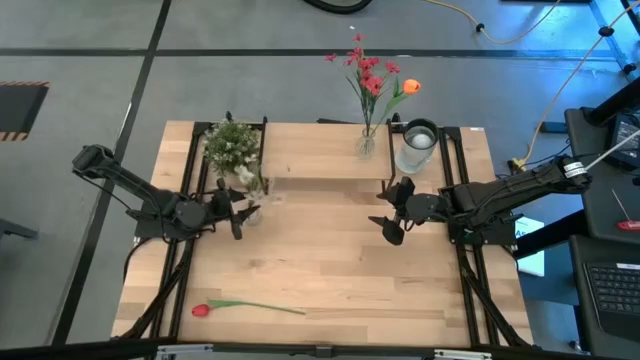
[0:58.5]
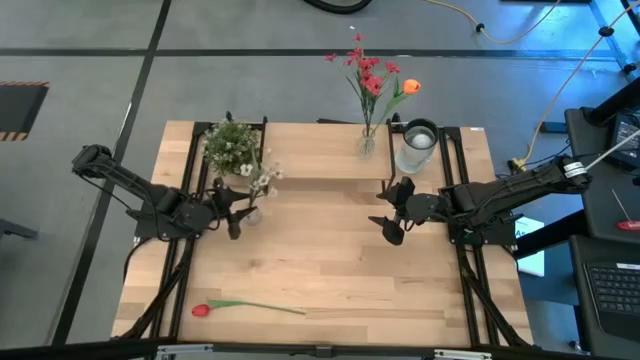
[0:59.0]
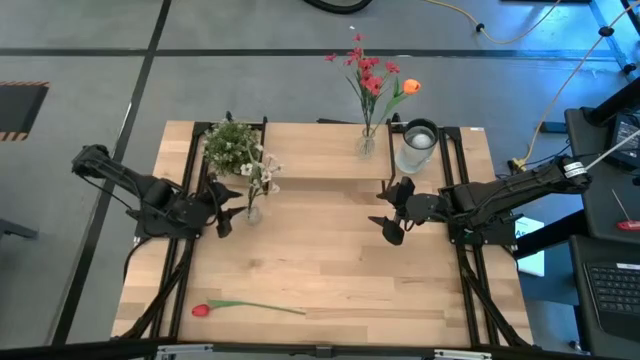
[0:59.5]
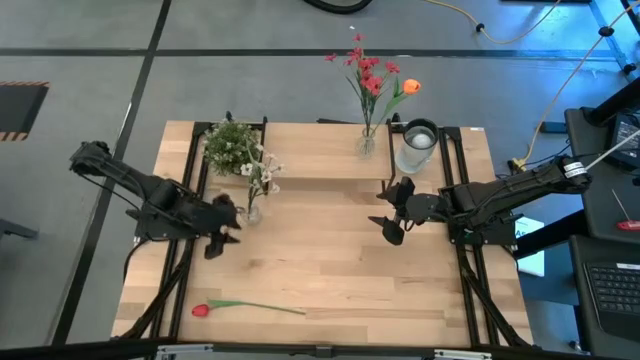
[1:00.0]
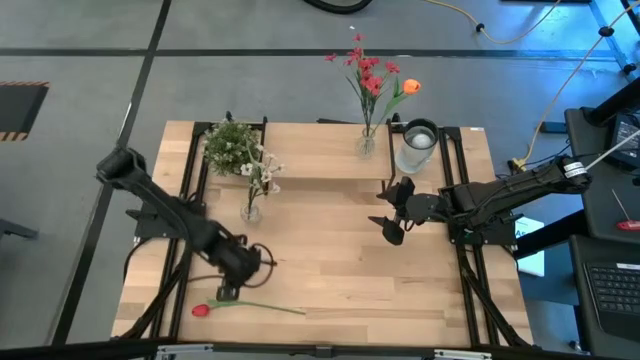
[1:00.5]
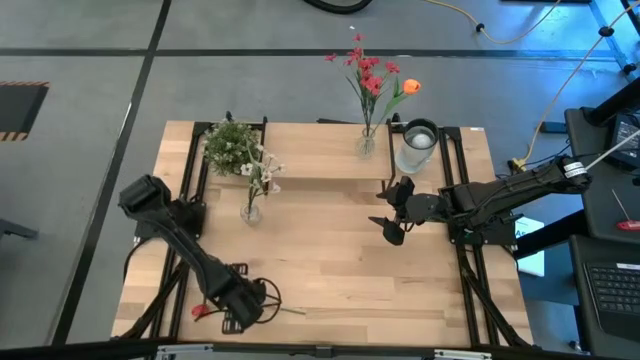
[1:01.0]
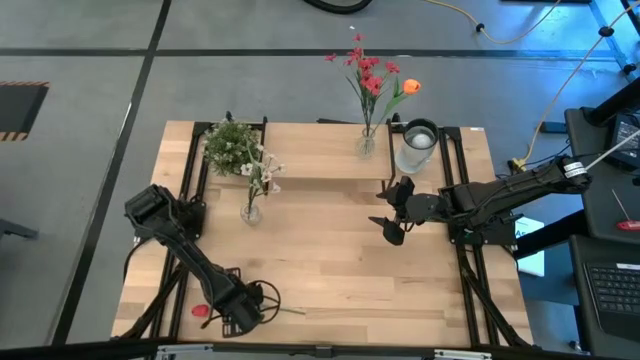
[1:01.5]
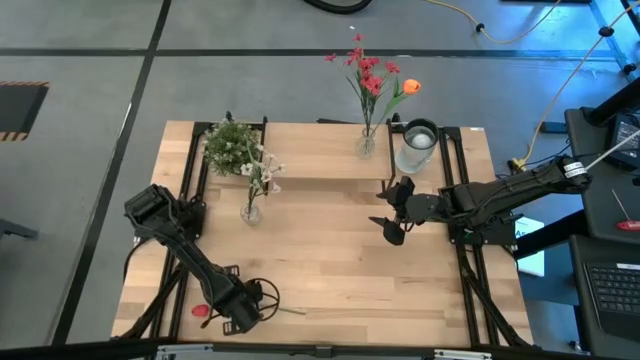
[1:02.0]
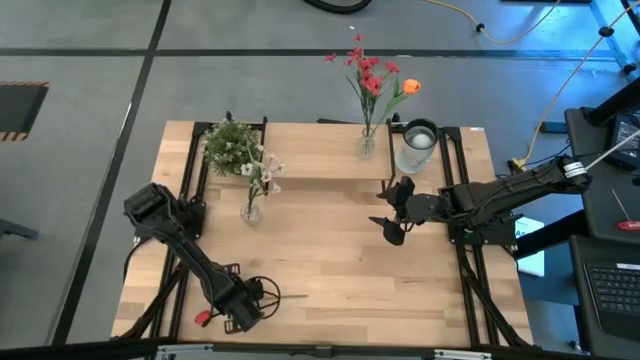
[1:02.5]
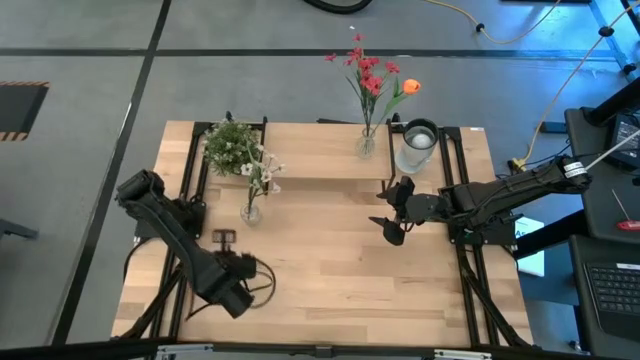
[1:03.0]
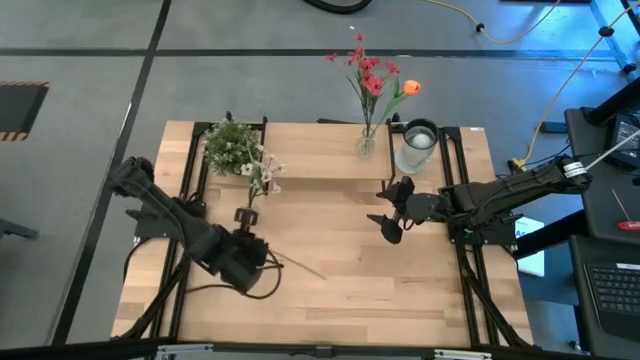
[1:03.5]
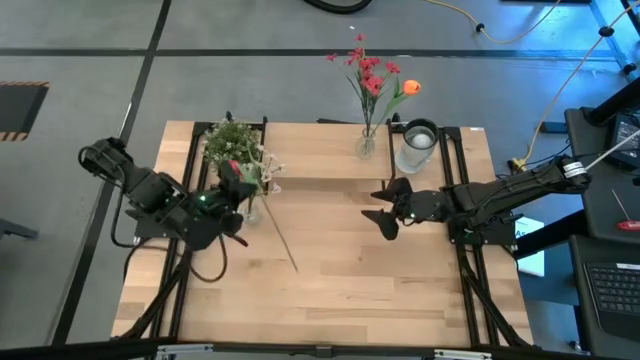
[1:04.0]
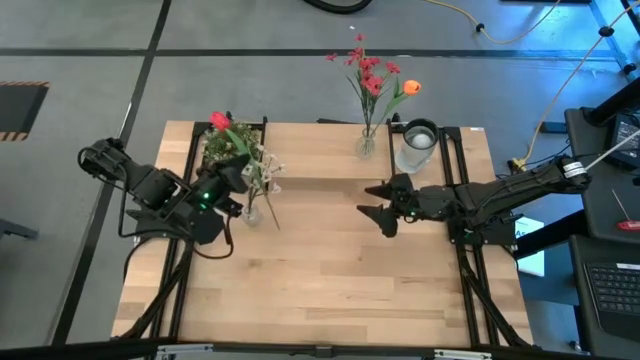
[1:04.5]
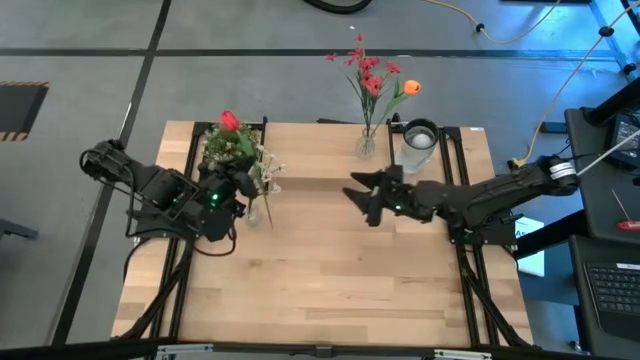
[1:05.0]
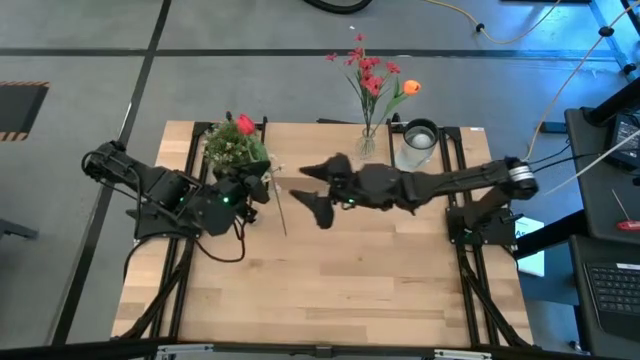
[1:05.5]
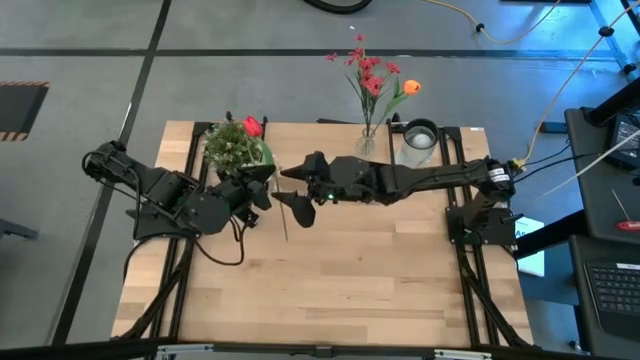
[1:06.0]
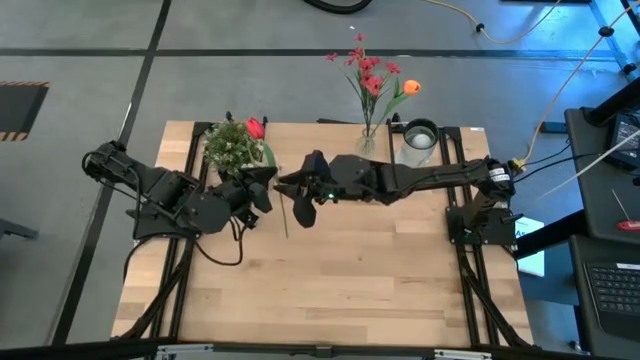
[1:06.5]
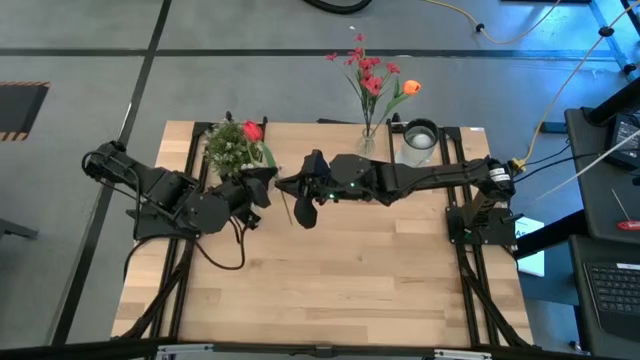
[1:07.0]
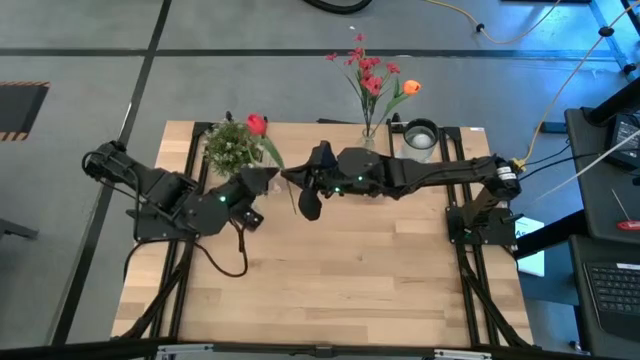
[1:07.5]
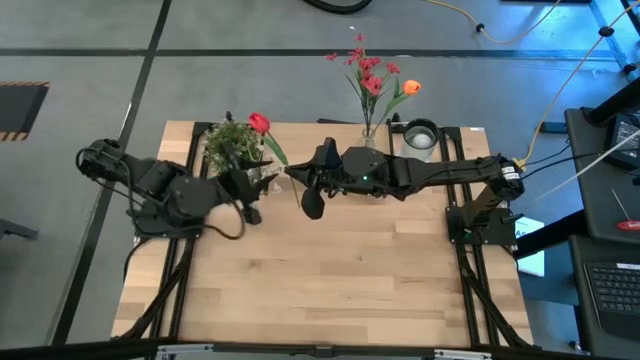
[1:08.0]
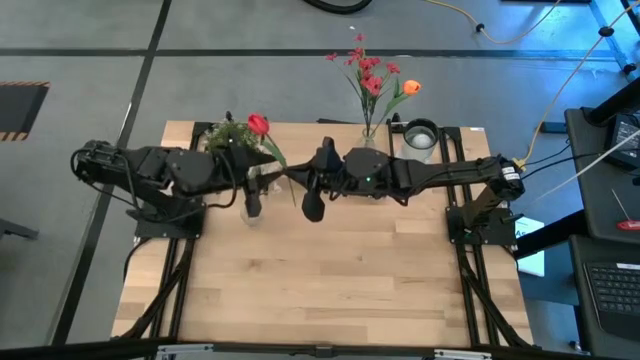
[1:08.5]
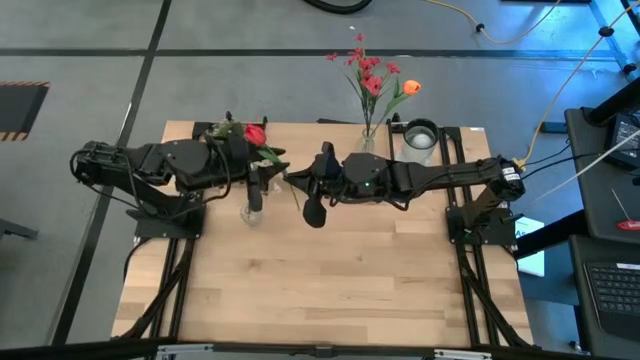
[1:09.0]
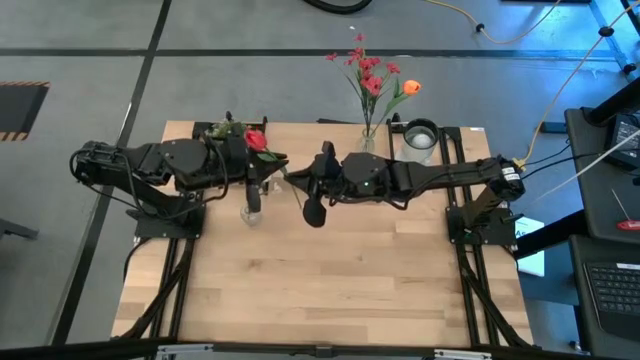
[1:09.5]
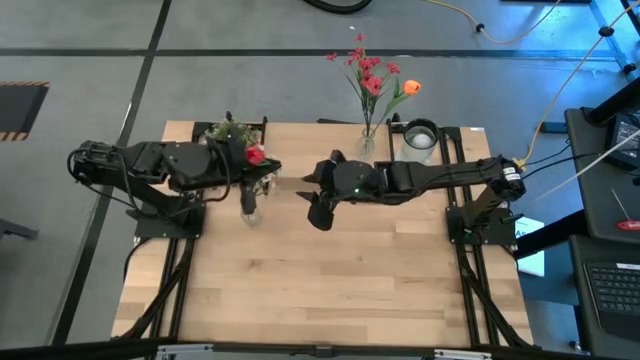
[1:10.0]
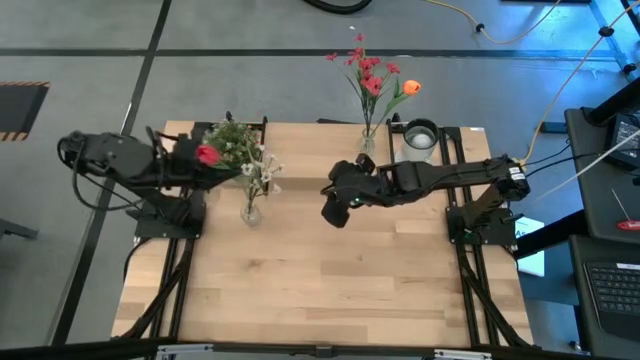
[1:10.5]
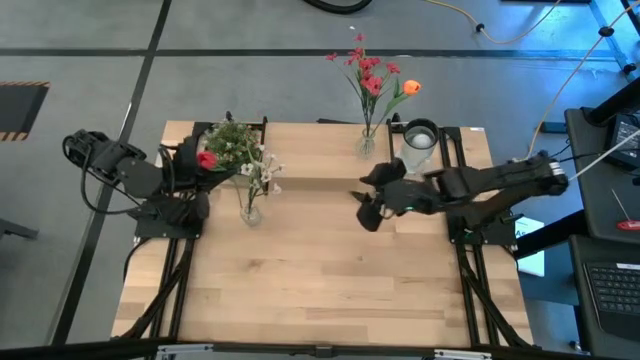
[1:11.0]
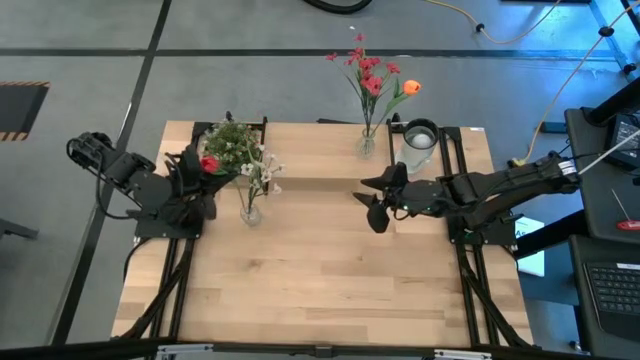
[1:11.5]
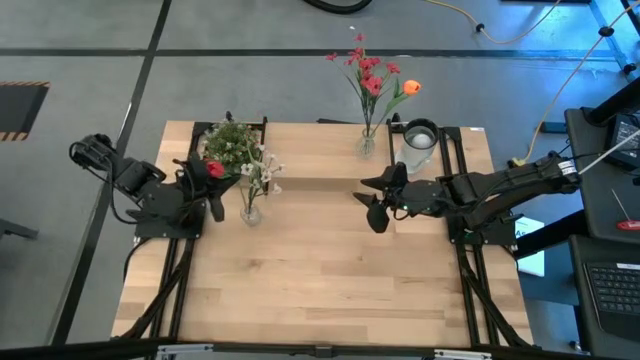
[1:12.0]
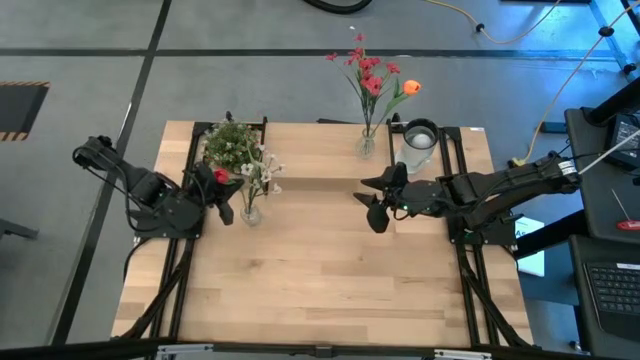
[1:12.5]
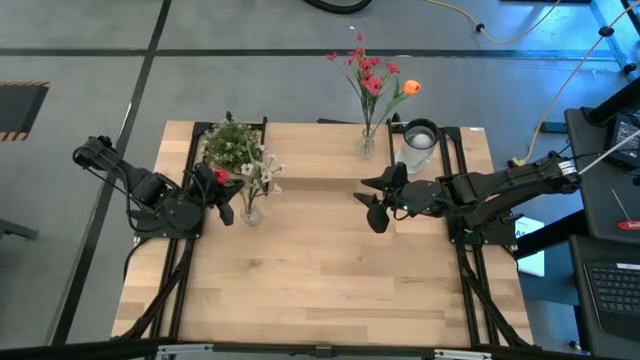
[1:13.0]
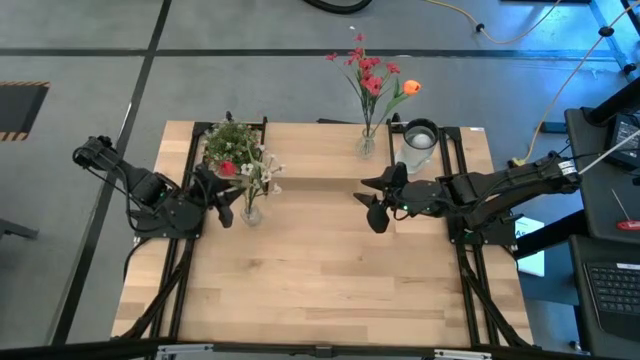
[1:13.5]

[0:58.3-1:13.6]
Task: Pick and place flowers into a vace then onto a shelf
Put the red flower into the transparent vase

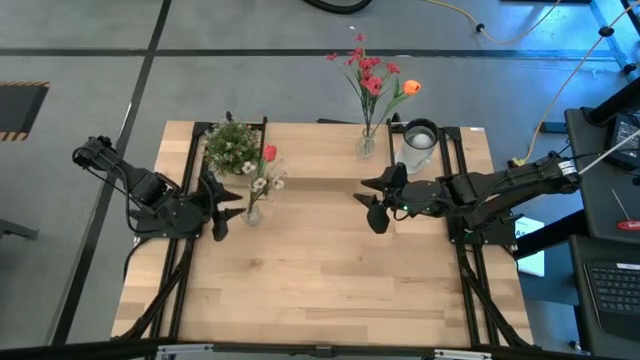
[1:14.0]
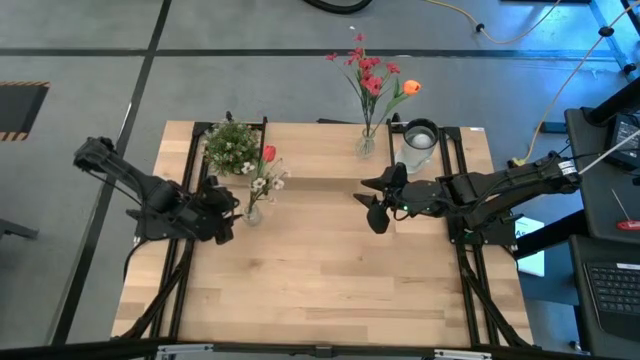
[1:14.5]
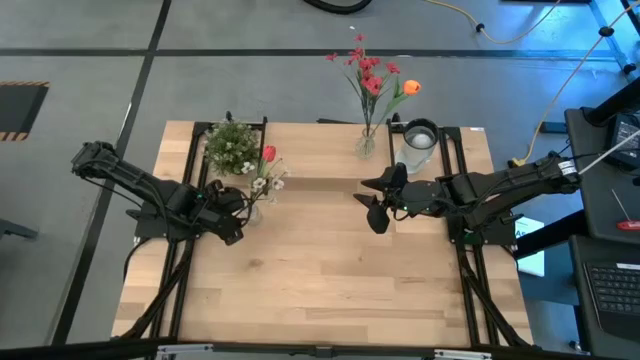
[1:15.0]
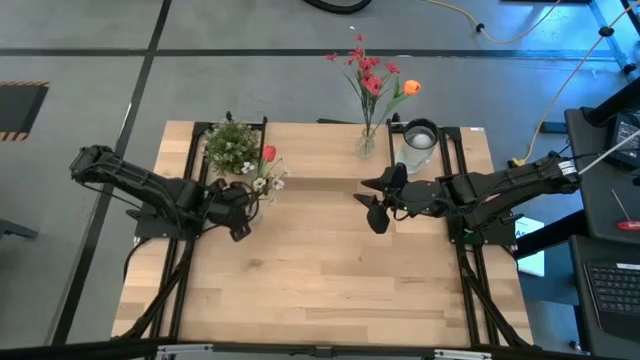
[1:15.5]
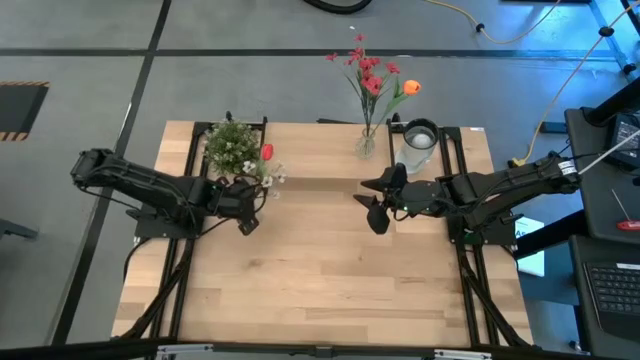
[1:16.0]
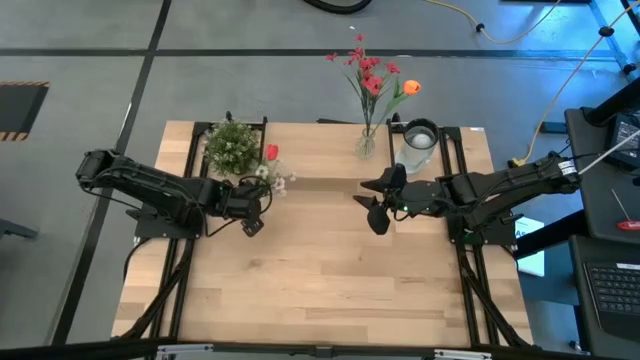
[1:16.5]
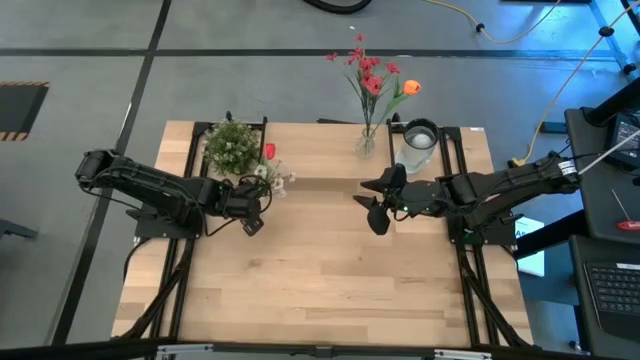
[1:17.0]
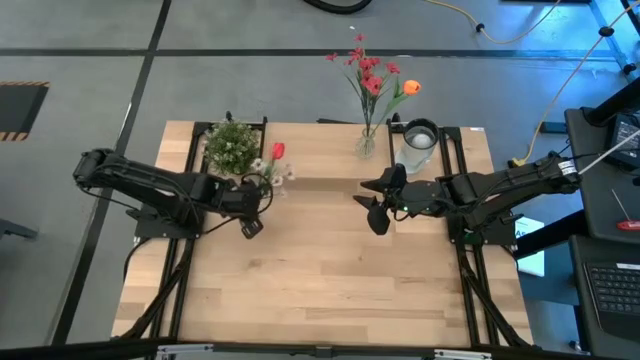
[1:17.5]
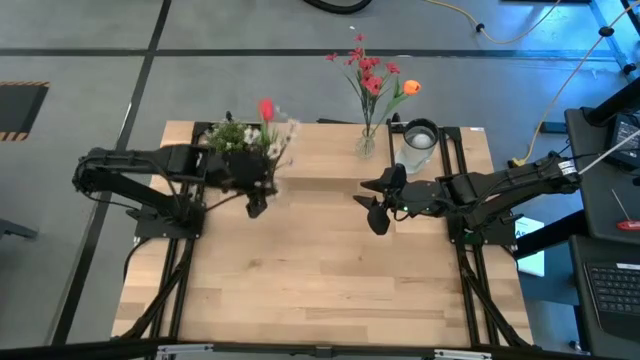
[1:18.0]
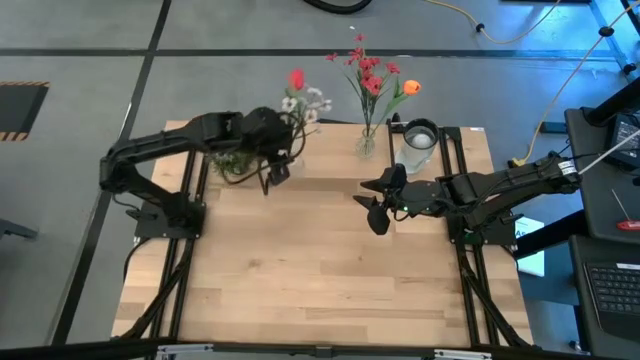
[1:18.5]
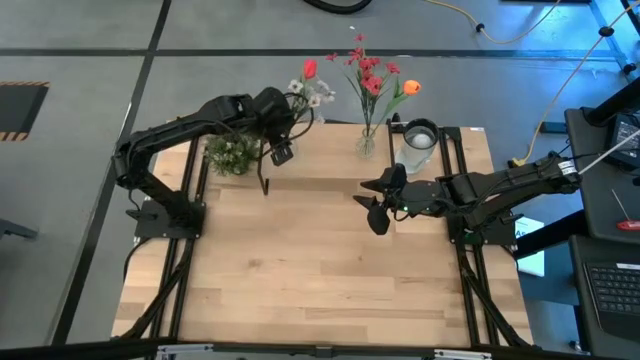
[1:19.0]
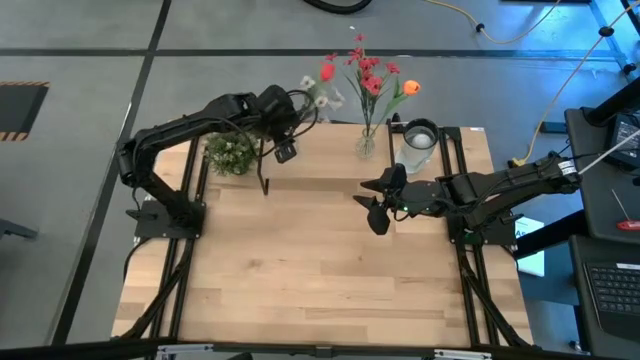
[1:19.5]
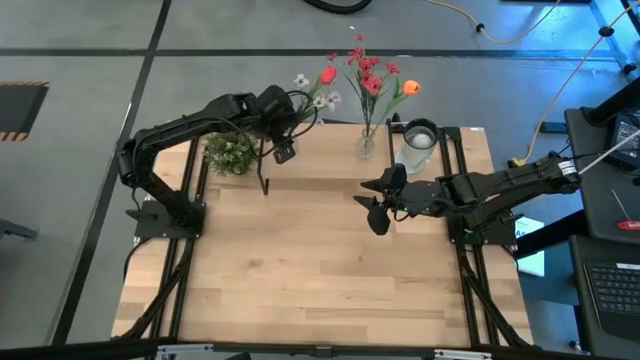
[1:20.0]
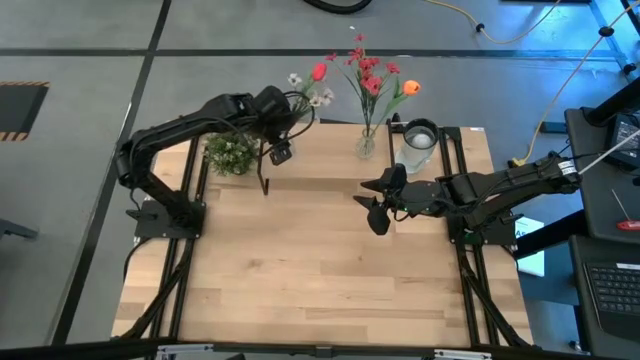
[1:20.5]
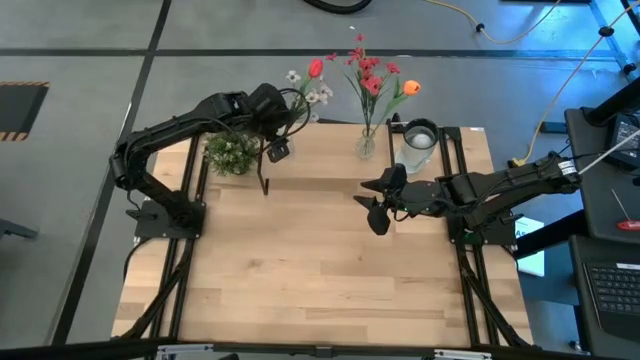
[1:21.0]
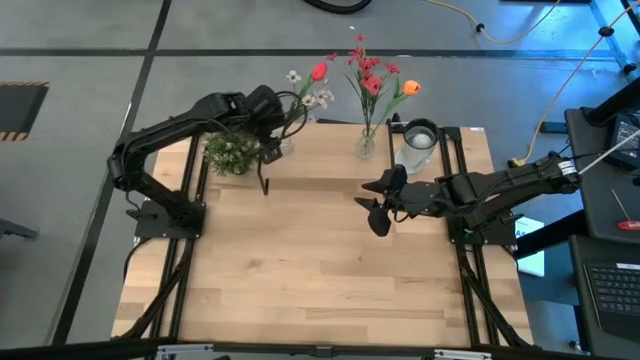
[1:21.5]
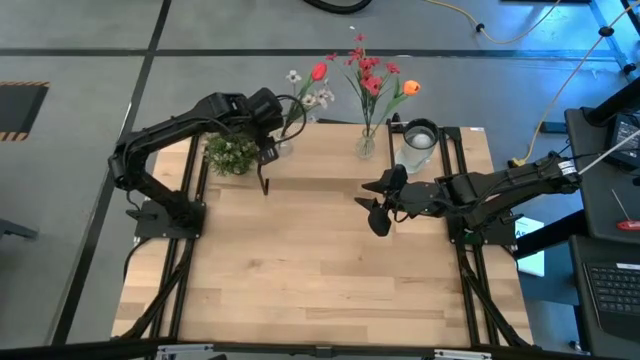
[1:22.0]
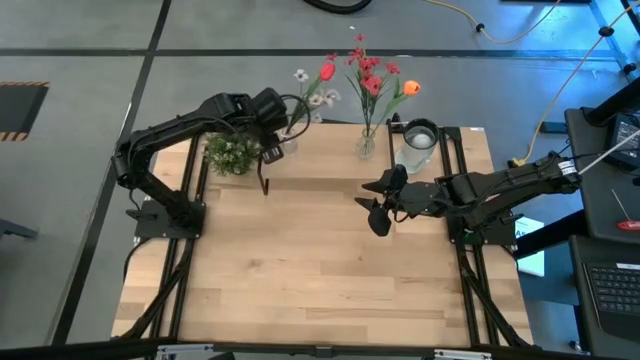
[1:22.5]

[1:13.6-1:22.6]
Put the transparent flower vase on the shelf
